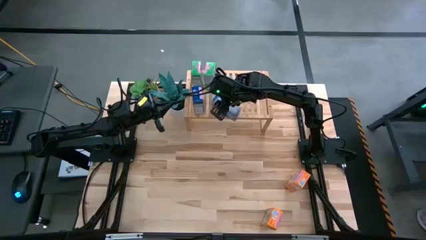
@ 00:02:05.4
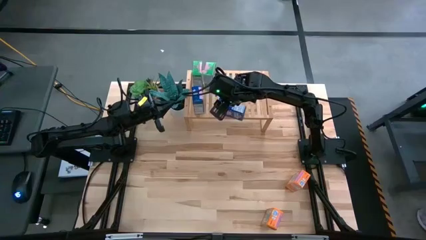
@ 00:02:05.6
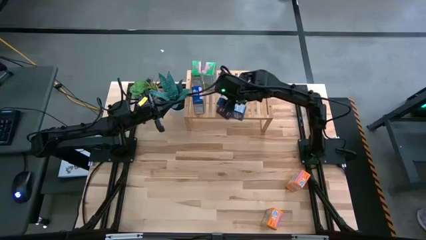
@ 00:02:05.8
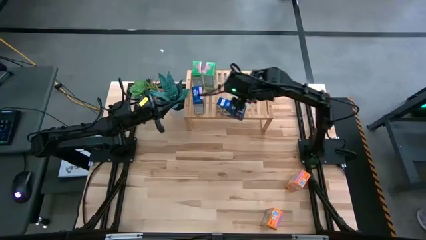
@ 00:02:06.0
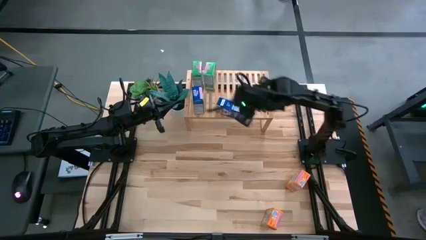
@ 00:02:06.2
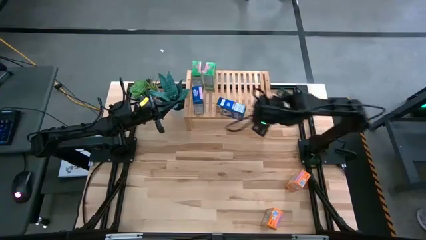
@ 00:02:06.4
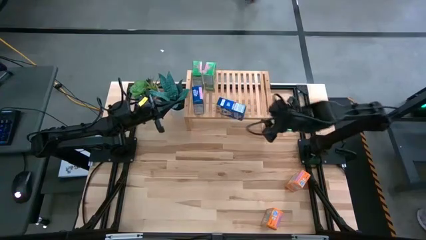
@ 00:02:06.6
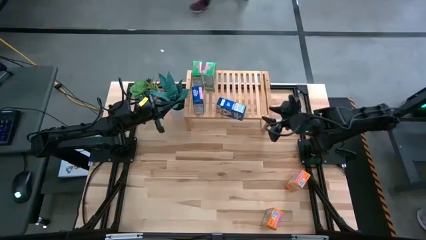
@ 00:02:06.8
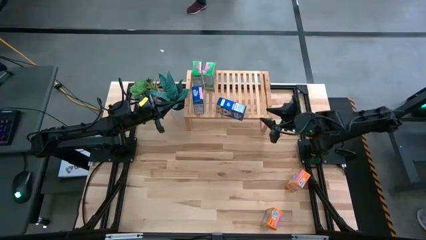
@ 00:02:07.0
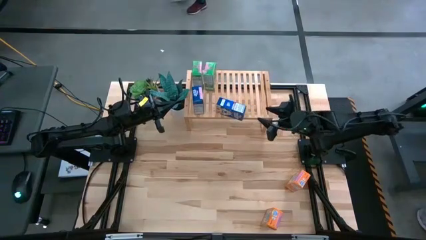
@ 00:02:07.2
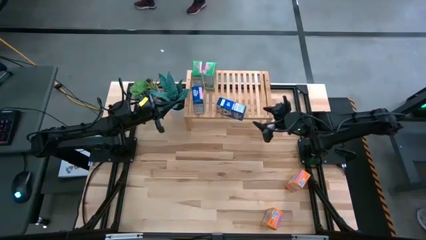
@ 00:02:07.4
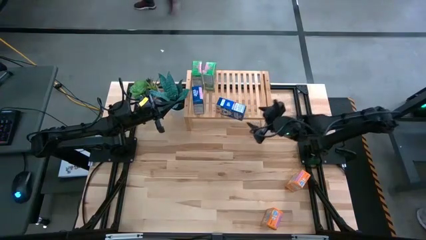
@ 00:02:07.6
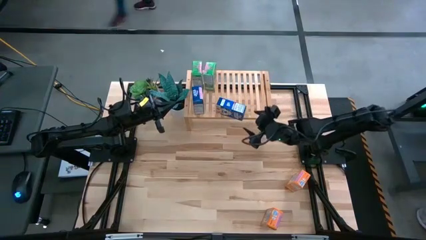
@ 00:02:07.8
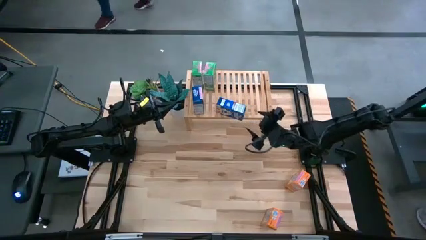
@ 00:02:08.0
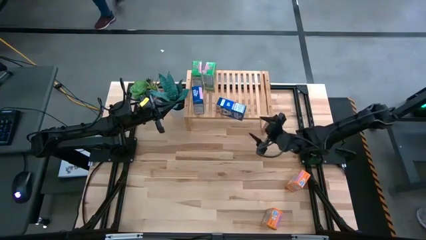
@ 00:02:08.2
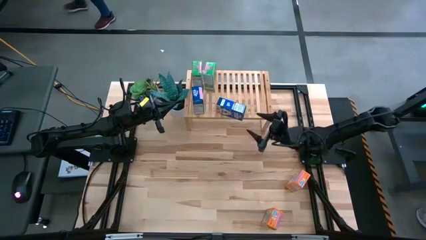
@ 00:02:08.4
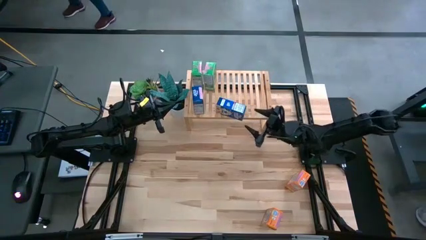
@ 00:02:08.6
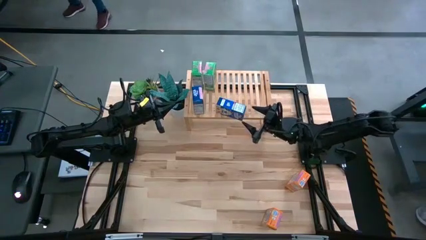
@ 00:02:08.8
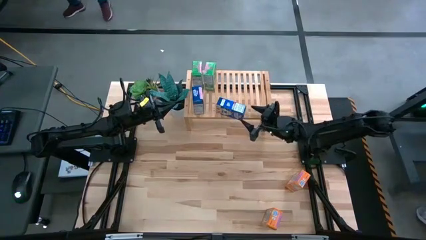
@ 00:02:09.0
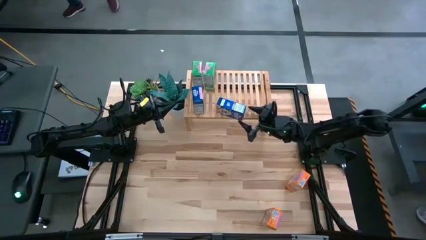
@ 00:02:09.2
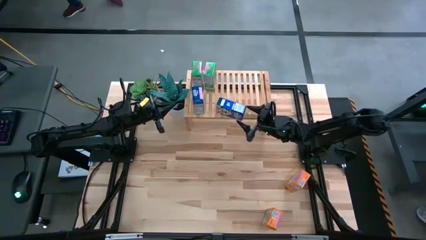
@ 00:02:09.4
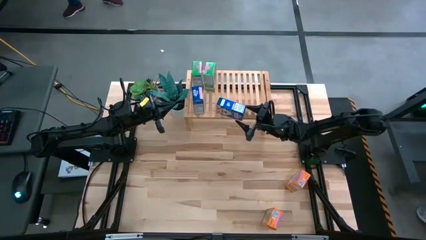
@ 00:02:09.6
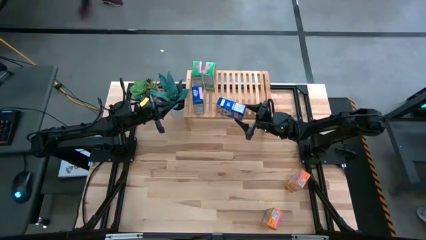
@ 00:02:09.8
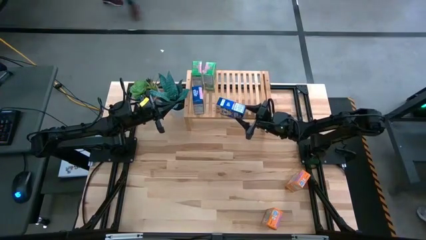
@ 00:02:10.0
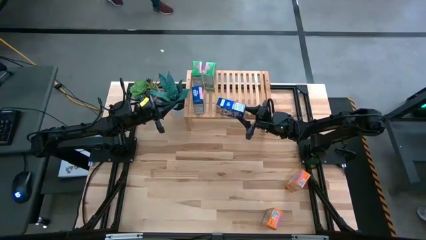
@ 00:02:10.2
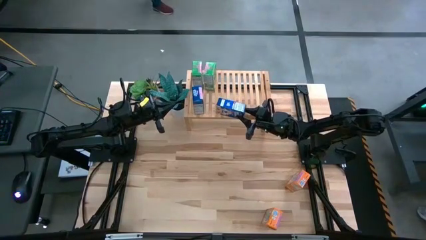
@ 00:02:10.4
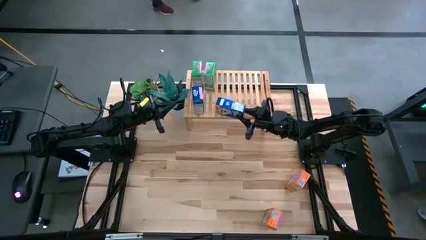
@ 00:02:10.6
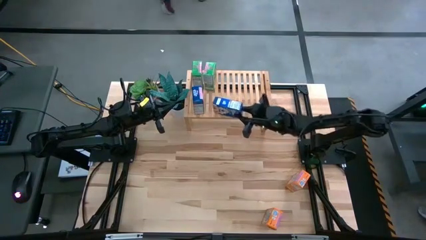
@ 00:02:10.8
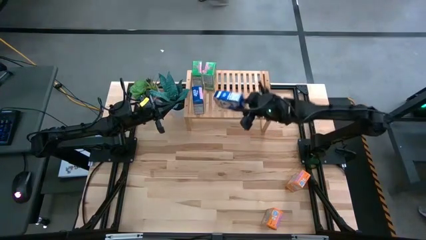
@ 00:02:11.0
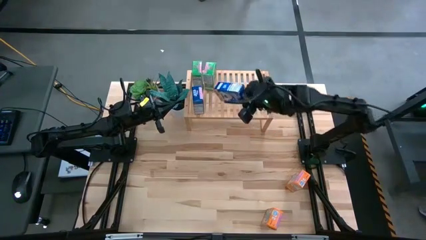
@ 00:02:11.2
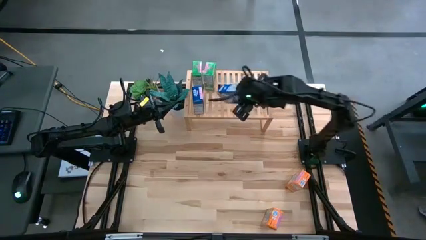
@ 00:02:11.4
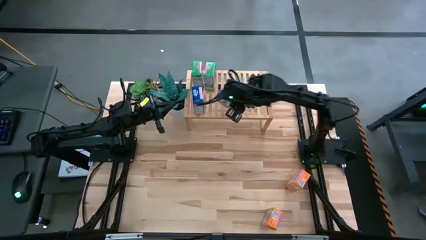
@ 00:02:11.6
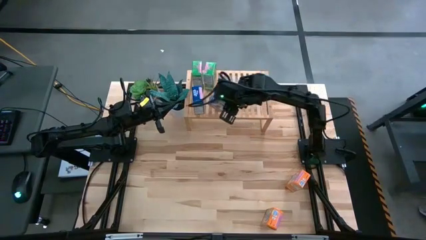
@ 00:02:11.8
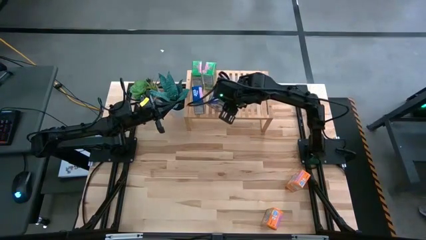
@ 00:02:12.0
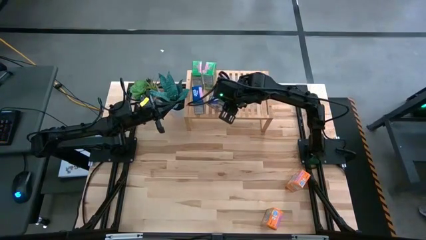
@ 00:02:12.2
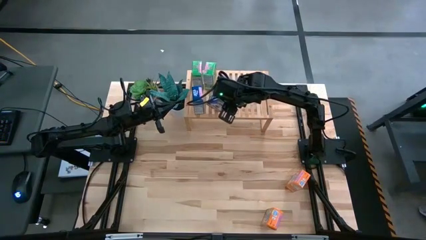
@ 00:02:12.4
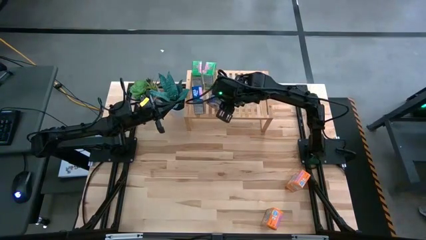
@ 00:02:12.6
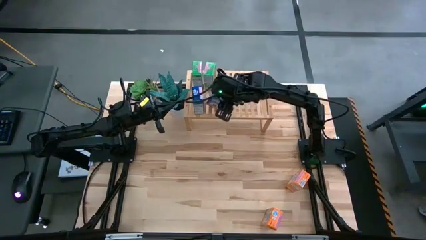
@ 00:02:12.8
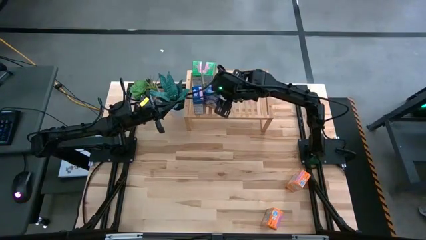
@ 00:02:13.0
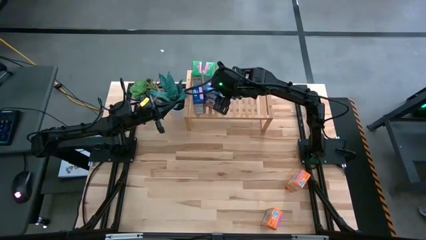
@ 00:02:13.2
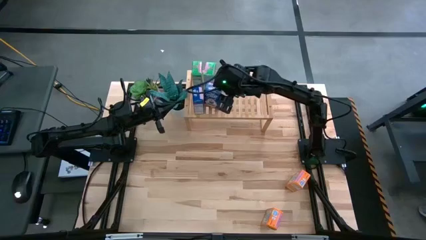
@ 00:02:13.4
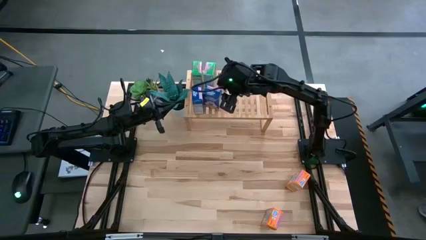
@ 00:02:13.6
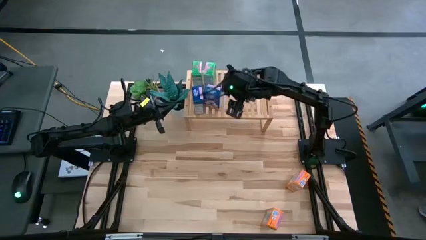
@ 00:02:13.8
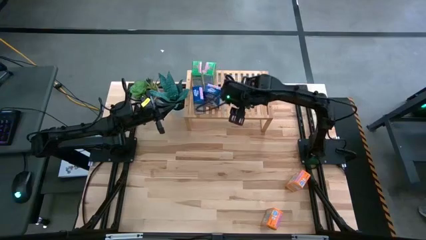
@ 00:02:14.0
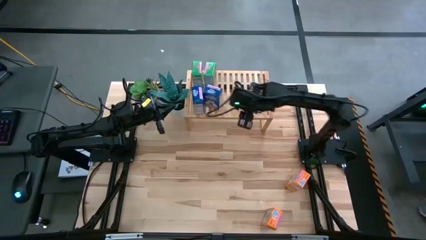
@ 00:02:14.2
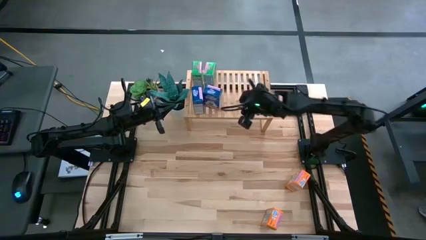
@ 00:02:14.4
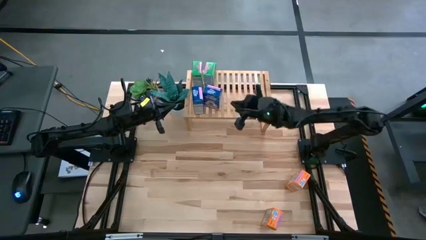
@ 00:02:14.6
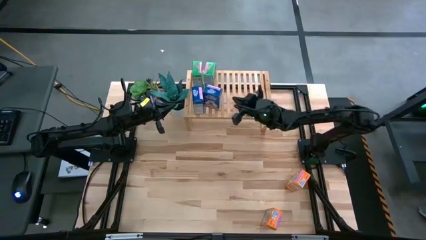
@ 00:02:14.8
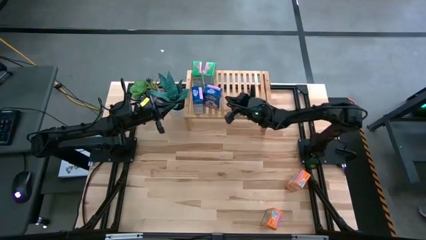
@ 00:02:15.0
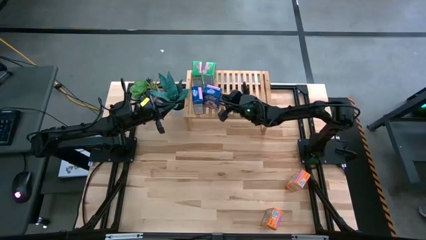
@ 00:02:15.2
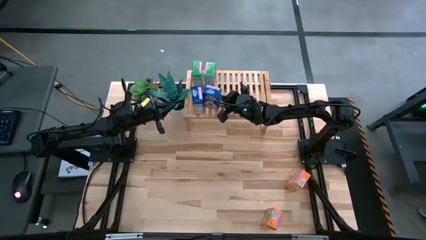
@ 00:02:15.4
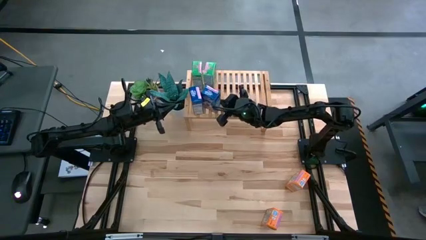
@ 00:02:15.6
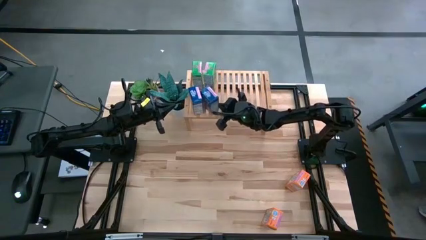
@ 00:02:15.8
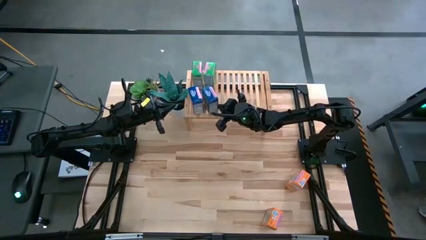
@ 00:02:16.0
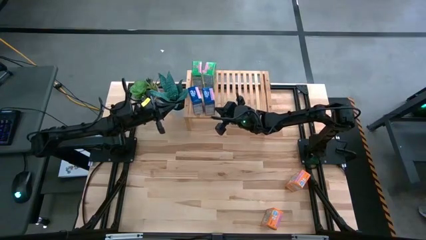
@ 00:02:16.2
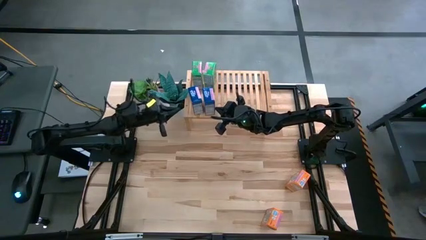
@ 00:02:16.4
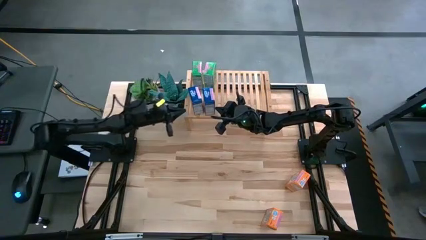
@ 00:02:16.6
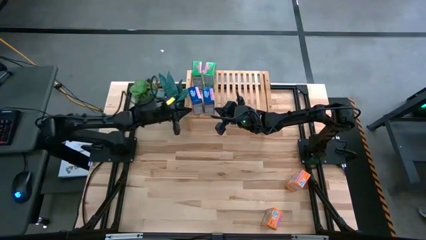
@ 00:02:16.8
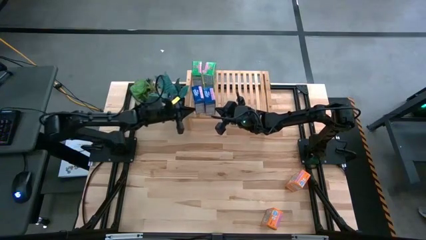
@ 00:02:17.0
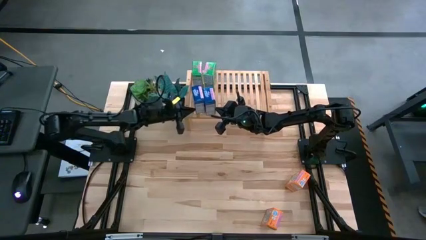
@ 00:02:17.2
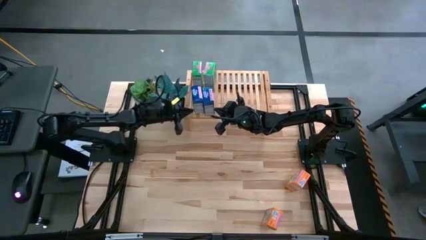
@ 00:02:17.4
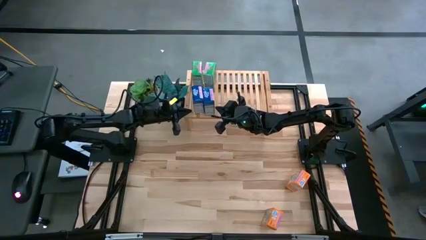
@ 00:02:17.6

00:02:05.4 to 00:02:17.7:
Task: Stack cereal on shelf
Put the blue cereal box on the shelf aligned with the other blue cereal box

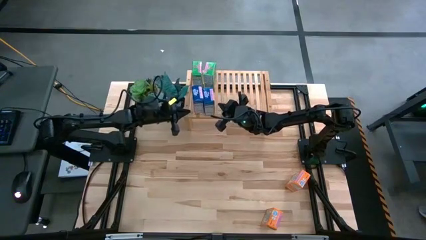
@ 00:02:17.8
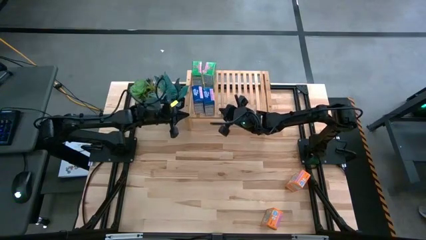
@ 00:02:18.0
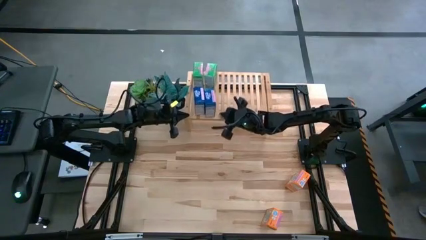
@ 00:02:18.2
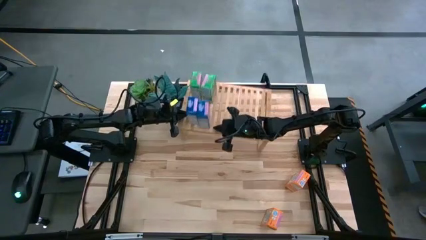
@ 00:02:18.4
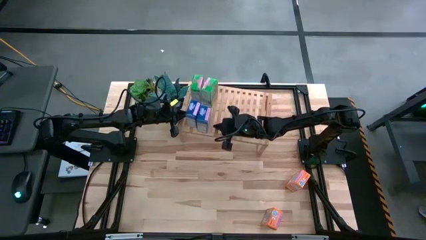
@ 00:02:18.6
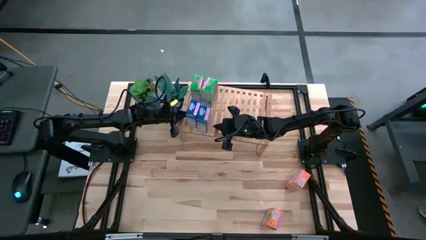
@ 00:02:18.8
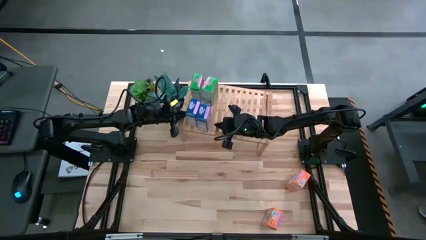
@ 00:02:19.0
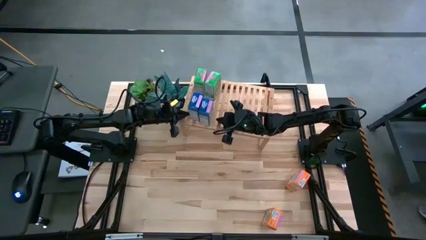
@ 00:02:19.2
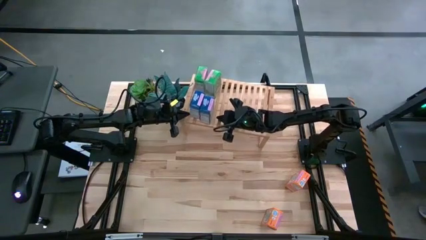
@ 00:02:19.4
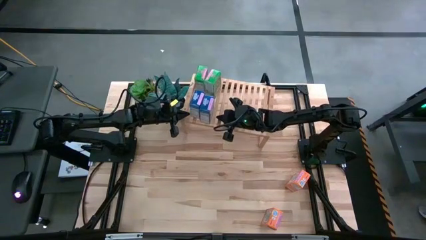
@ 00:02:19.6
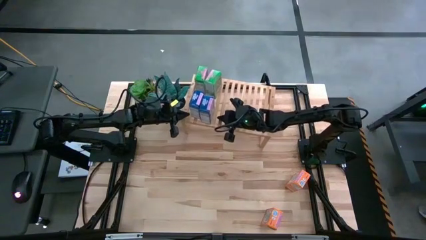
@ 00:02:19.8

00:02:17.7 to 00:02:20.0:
Adjust the shelf

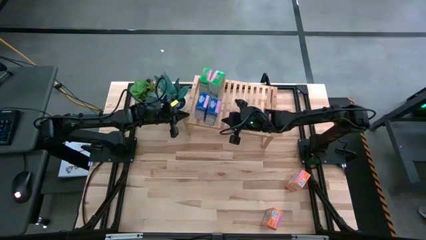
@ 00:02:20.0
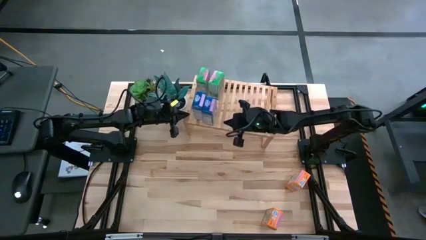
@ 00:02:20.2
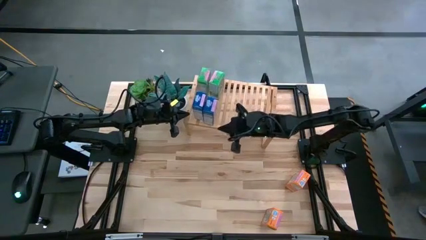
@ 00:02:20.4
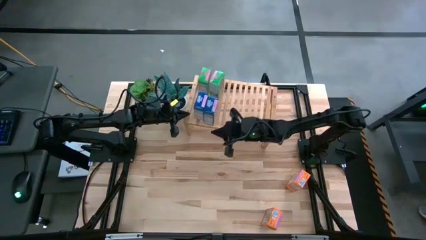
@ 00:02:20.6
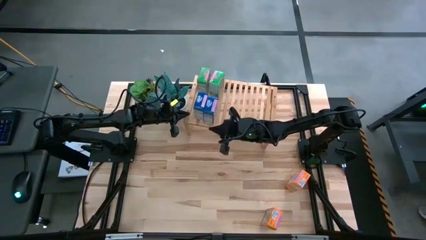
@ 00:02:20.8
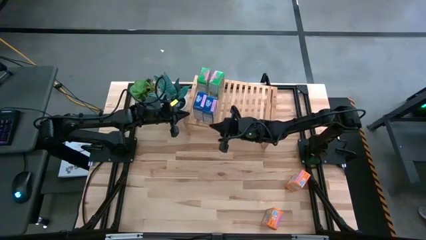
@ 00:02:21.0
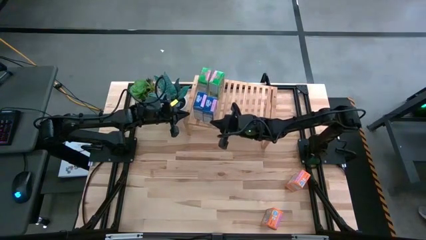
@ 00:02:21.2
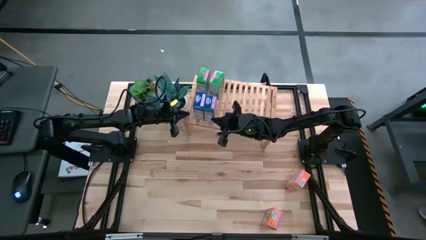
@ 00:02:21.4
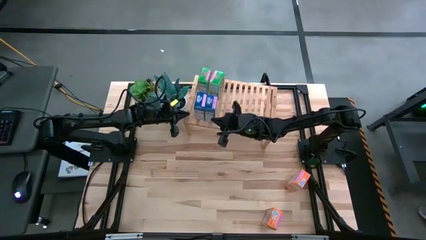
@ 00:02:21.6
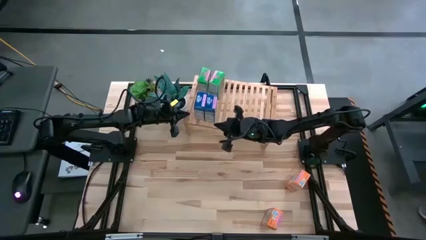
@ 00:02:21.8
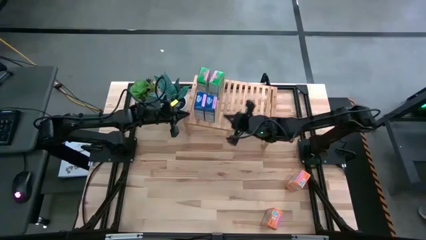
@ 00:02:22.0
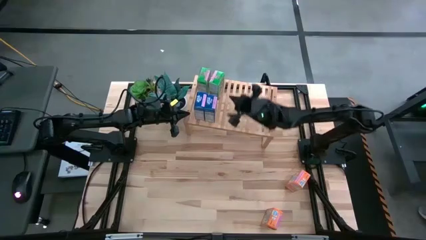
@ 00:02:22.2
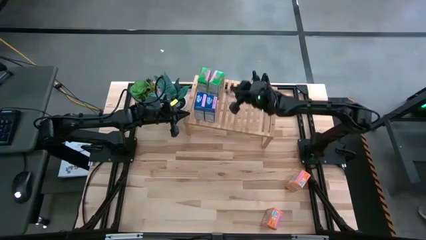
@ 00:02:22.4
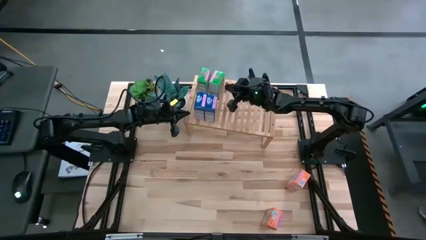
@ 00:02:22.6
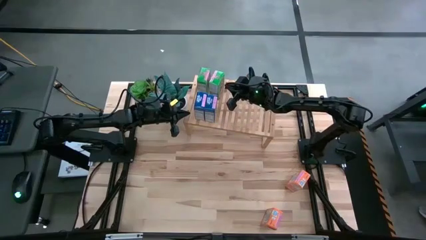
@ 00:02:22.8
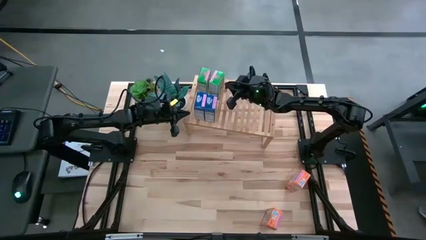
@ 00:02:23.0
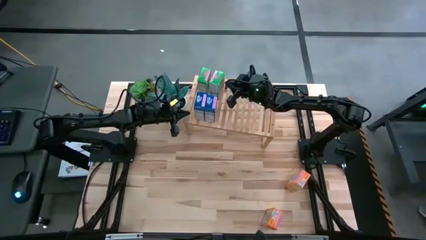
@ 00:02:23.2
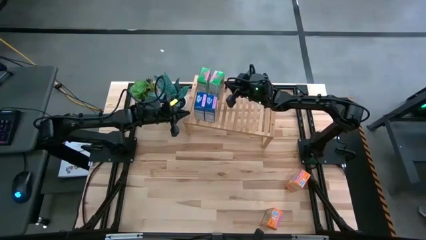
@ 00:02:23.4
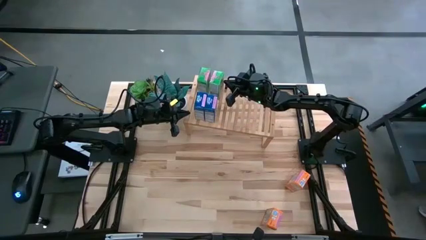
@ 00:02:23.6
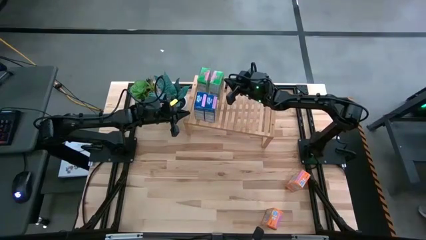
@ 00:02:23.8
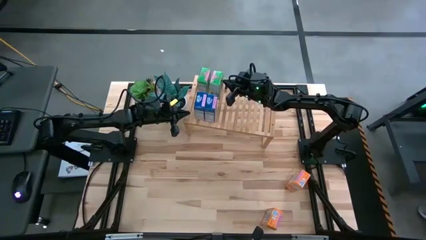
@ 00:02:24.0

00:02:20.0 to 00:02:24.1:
Adjust the cereals on the shelf
